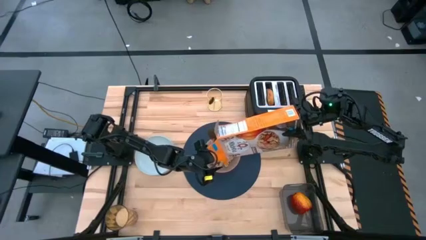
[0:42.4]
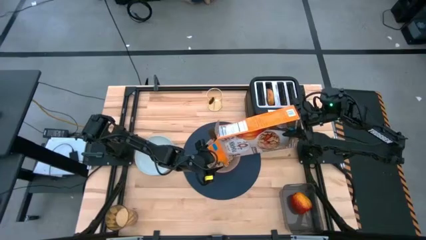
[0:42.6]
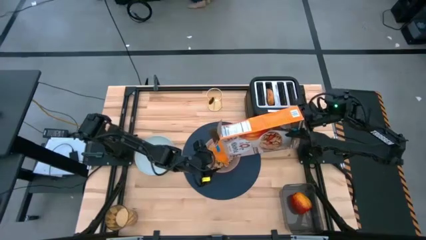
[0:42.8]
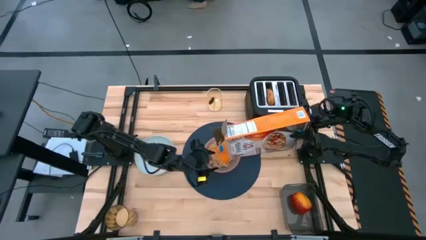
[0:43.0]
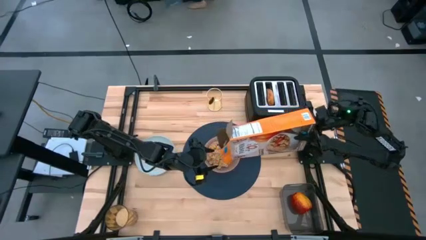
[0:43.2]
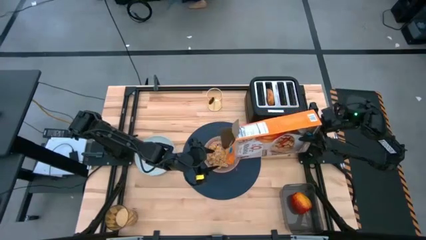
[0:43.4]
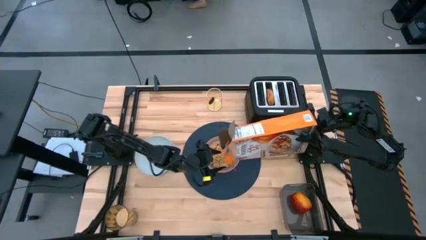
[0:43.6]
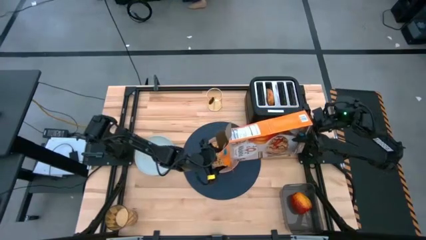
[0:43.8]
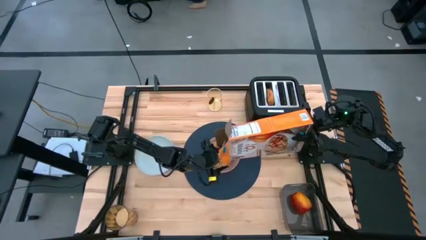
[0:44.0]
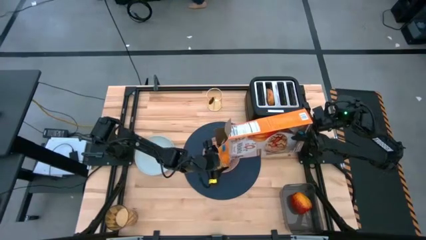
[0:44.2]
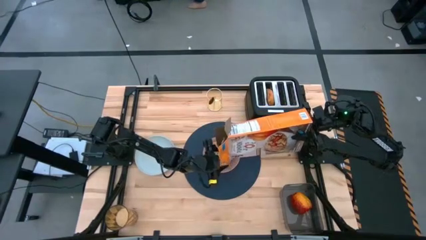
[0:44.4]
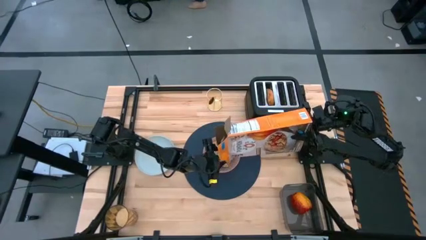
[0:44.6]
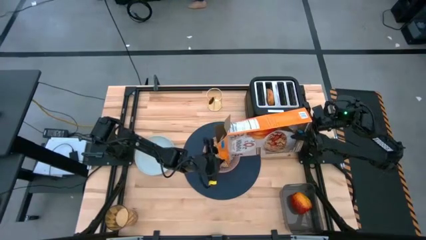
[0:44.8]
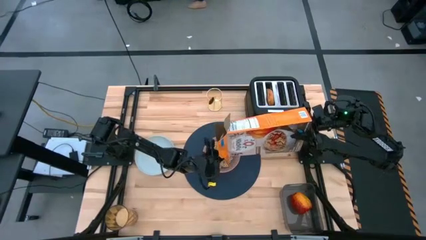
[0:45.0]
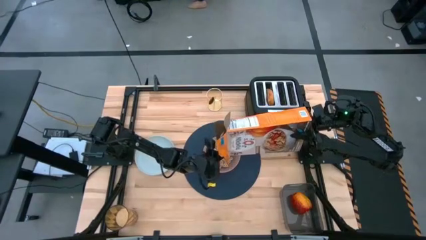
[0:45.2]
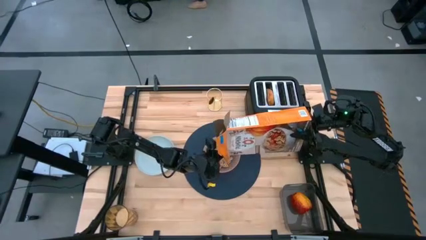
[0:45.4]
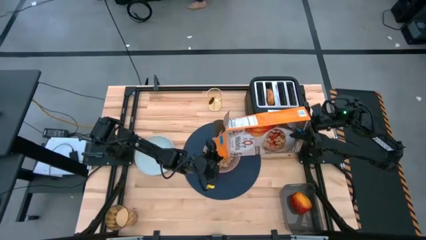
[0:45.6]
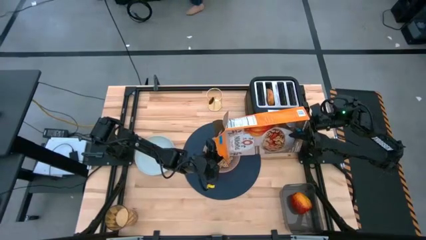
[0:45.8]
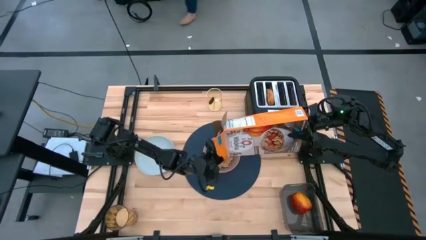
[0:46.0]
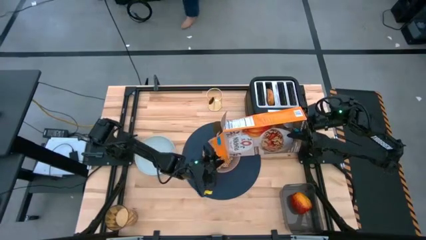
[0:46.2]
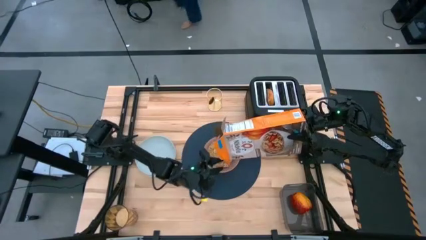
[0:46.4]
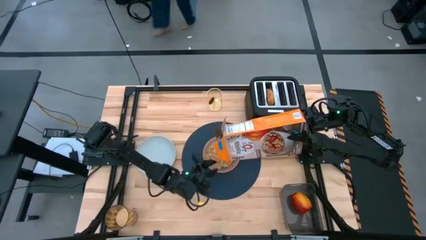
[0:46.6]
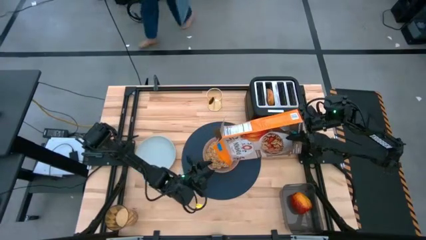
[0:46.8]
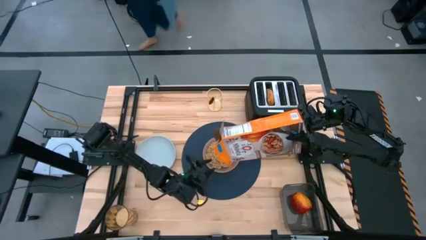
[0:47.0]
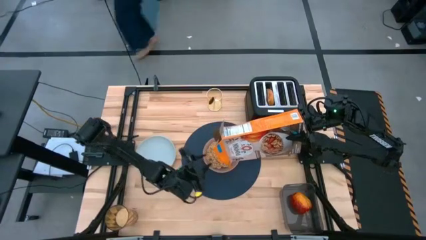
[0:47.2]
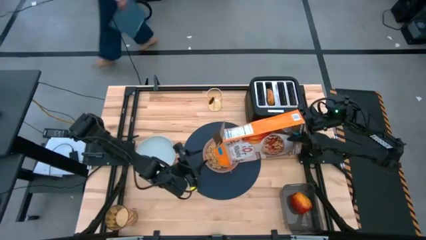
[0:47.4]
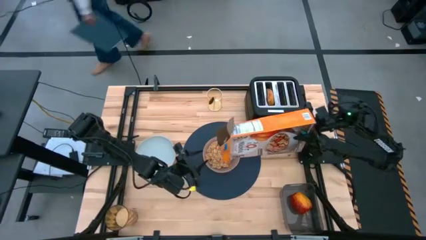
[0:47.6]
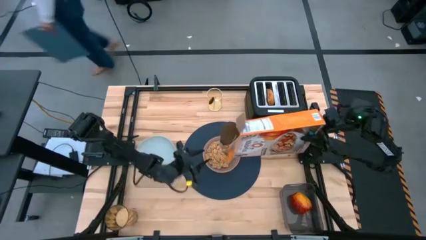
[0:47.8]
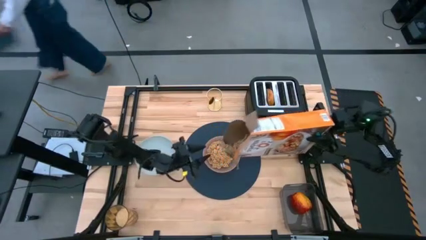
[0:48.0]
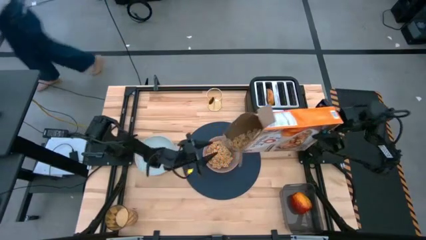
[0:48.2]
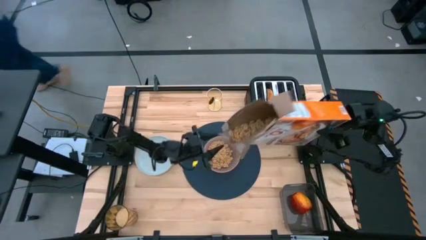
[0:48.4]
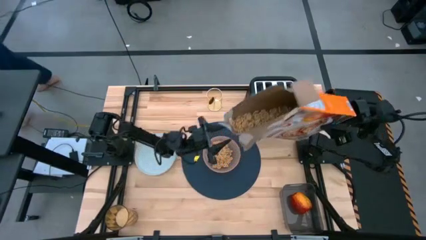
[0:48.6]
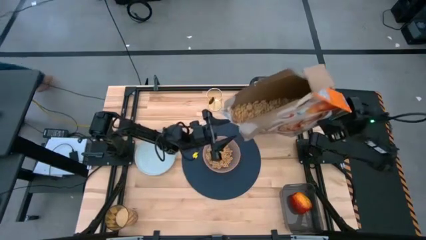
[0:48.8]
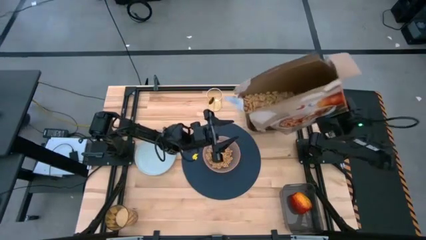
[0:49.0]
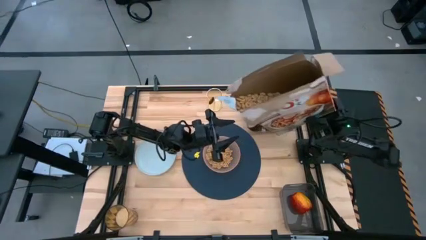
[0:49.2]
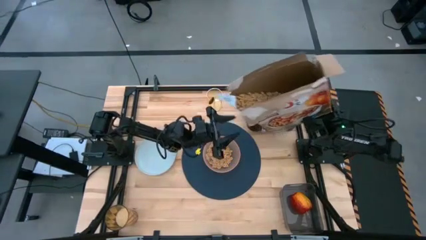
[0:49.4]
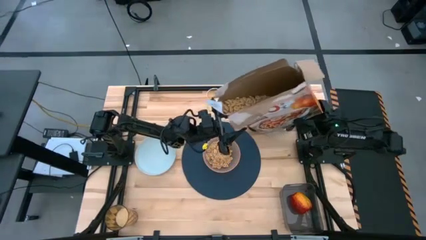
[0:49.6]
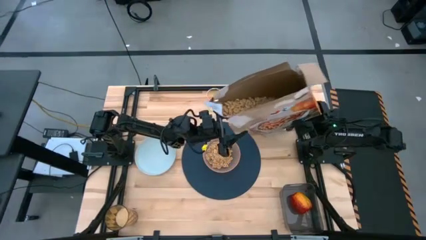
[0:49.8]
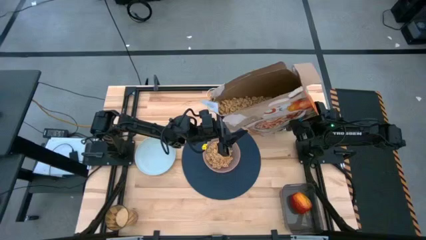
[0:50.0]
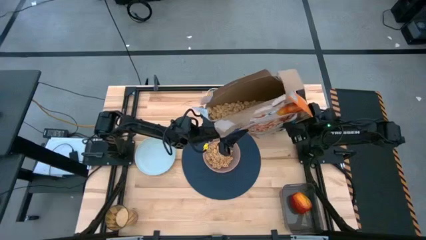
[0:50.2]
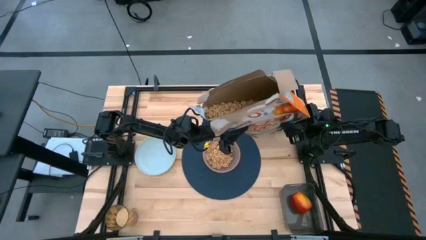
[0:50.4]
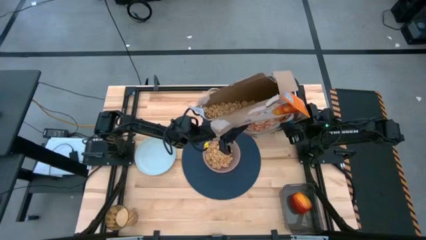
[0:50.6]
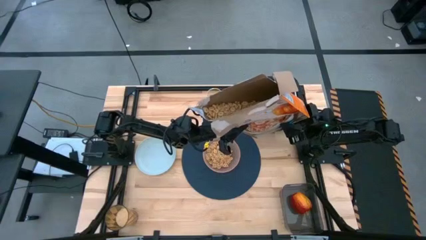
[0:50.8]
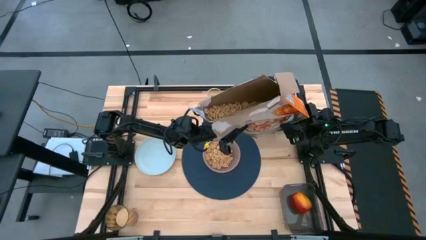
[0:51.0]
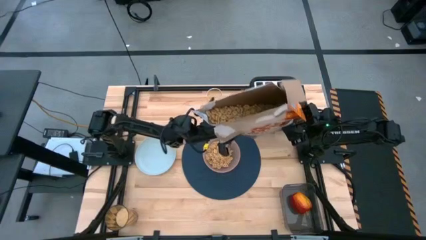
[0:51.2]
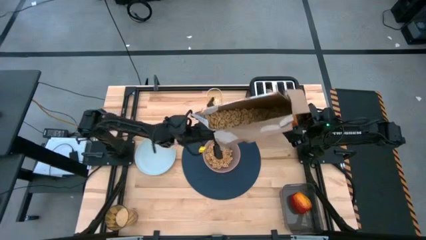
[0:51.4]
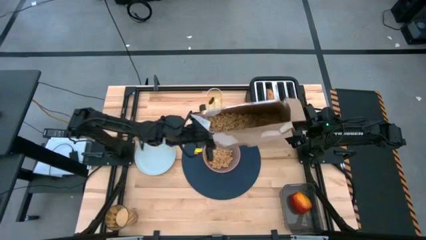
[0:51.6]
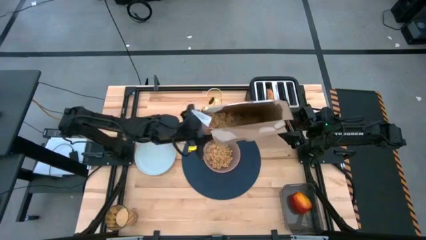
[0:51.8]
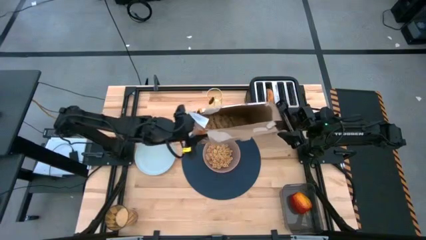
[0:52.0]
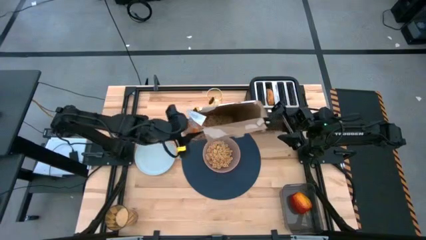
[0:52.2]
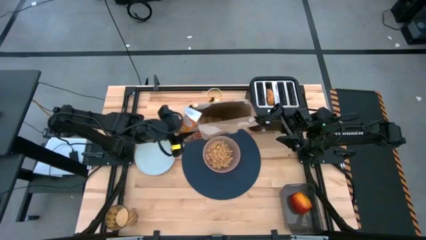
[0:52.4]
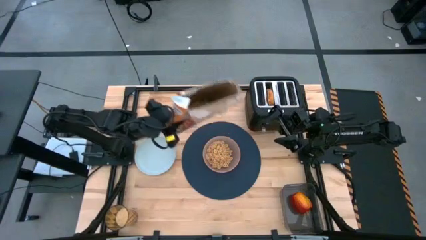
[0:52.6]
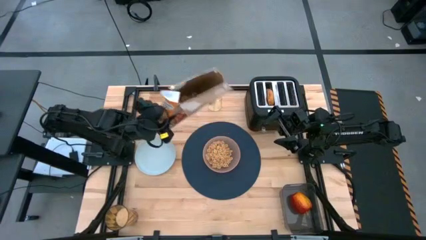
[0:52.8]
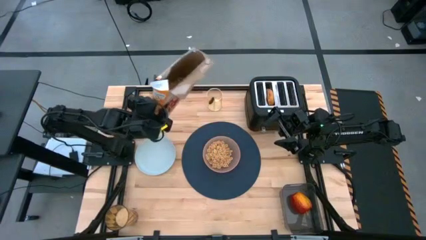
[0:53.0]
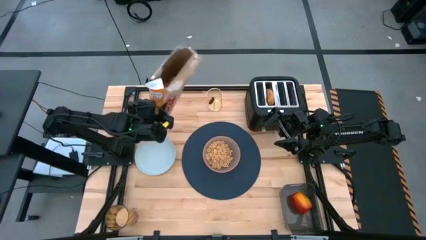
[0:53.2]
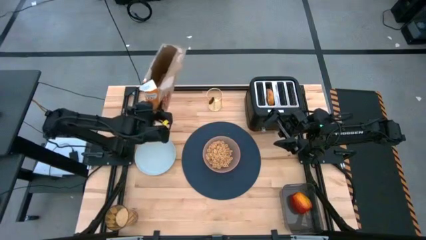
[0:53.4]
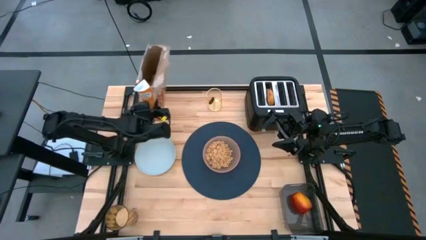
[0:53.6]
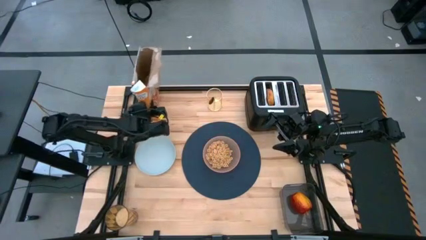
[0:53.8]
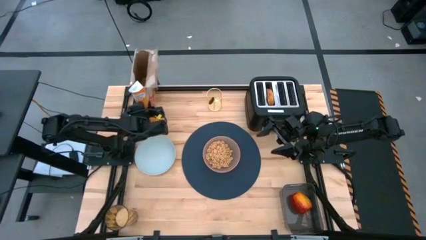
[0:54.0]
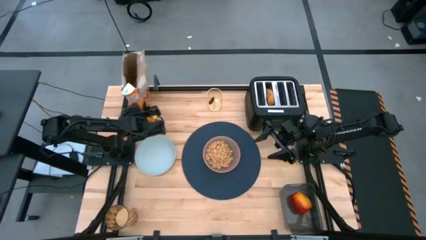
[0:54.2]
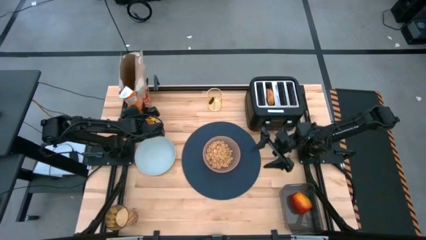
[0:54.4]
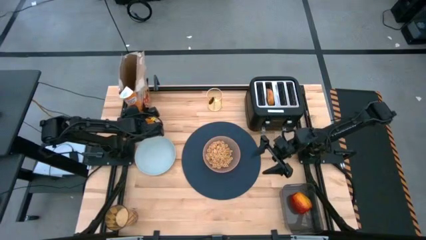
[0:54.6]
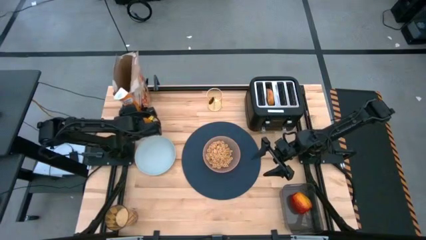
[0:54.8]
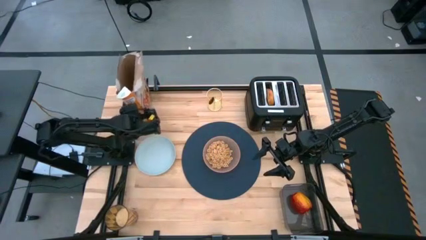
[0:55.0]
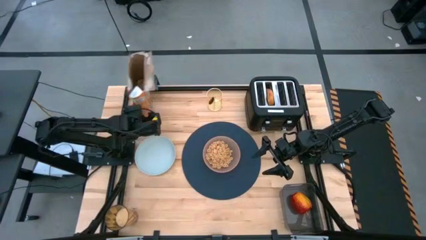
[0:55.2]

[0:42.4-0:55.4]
Task: Arrange a breakfast setting
Pour the cereal into the orange bowl

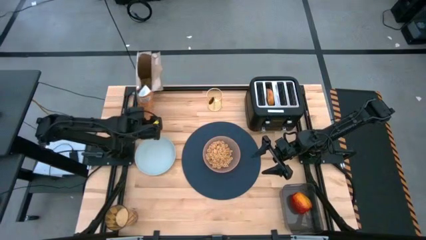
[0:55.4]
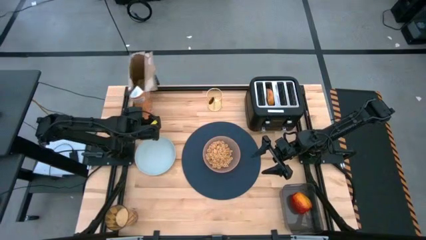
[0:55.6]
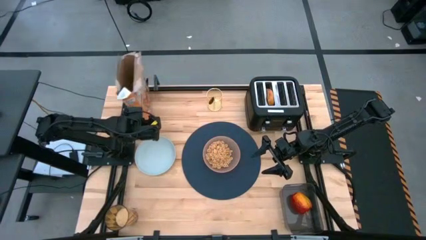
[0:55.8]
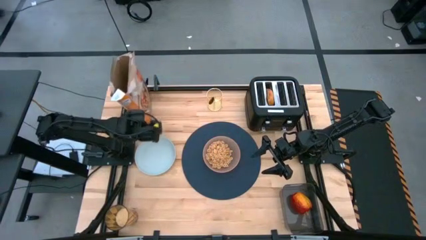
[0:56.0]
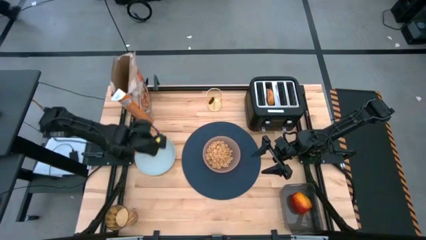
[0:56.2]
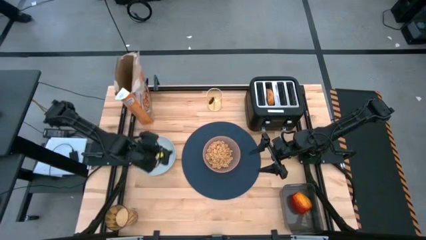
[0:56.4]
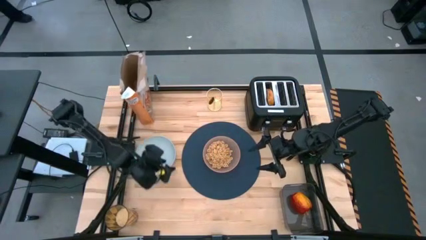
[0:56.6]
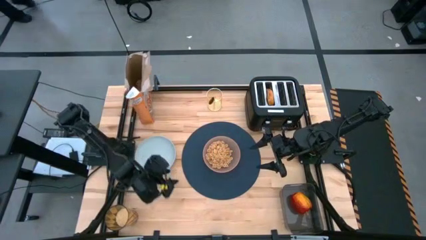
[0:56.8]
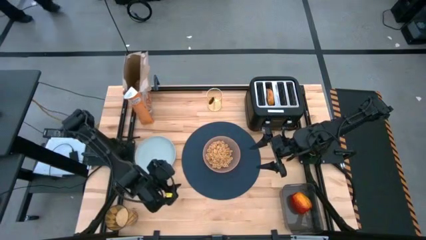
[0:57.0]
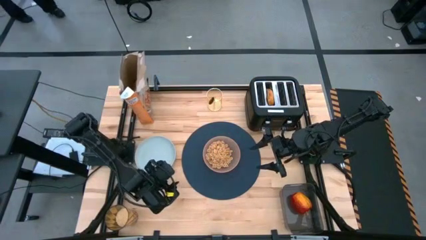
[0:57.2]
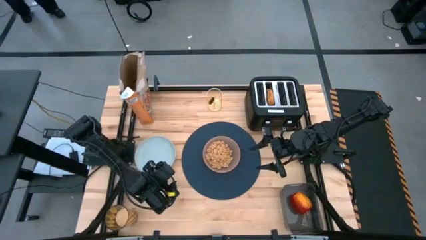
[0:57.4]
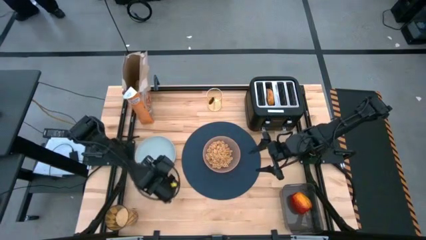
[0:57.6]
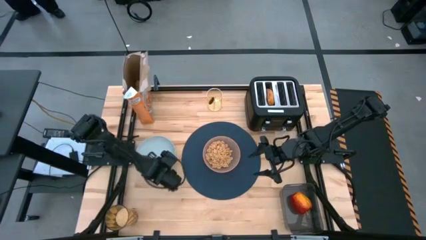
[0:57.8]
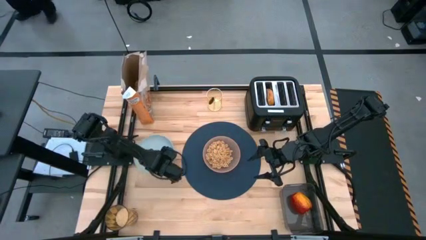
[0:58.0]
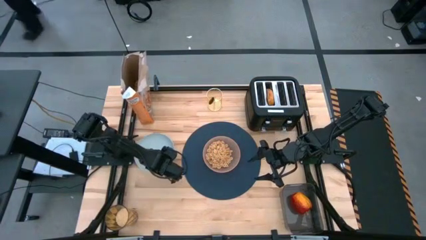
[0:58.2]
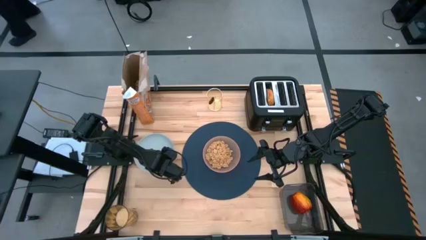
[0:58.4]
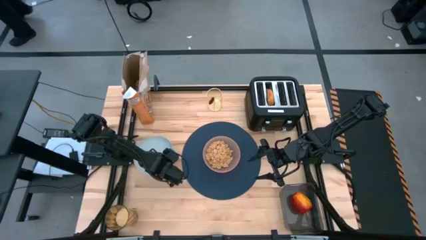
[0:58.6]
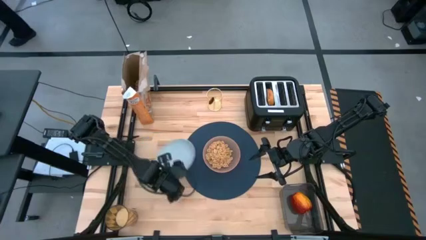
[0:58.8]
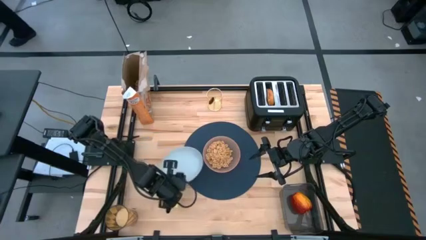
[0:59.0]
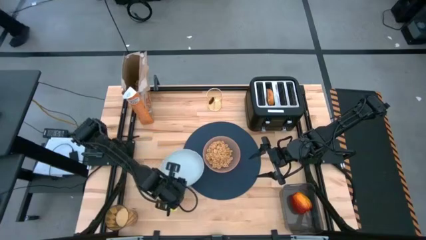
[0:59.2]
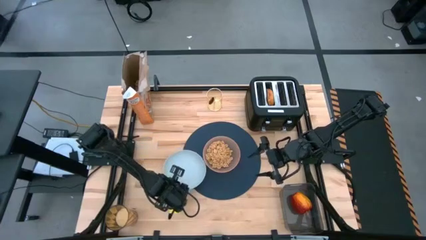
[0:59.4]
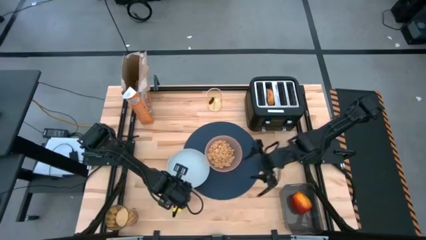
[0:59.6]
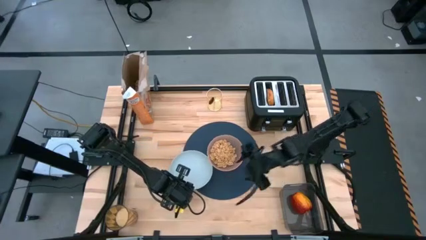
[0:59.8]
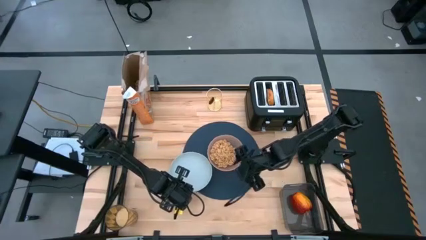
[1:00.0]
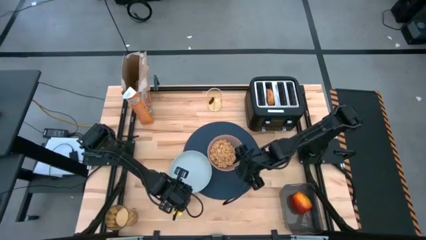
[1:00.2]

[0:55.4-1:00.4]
Put the gray plate on the left of the orange bowl
